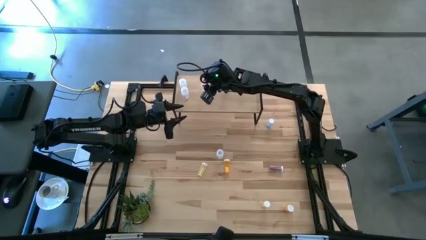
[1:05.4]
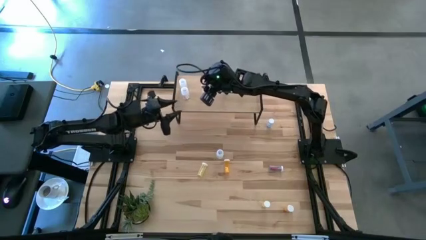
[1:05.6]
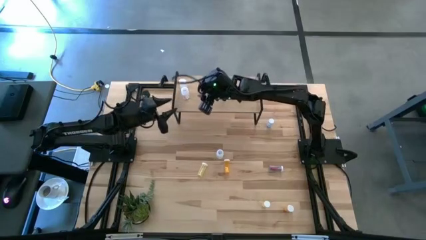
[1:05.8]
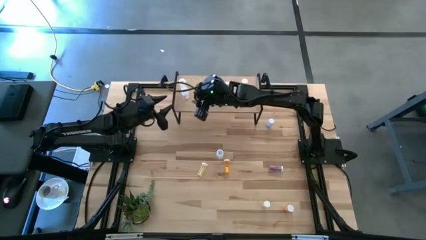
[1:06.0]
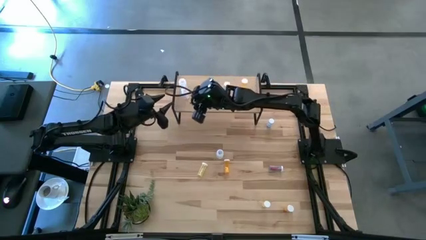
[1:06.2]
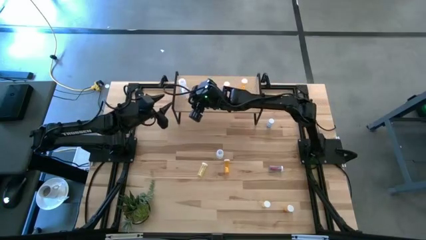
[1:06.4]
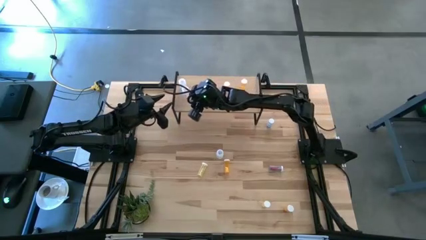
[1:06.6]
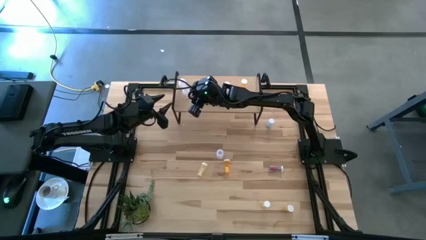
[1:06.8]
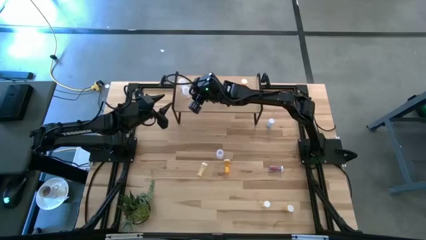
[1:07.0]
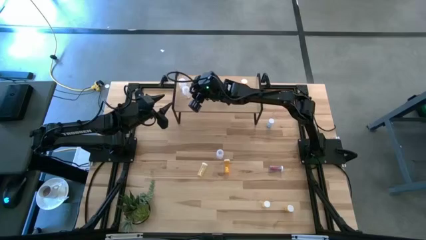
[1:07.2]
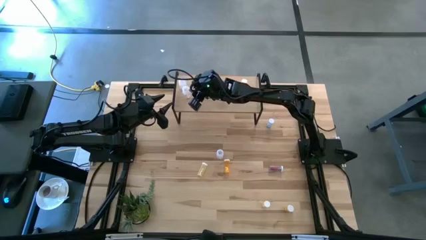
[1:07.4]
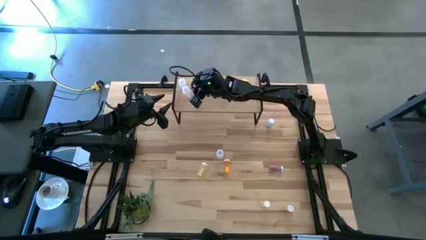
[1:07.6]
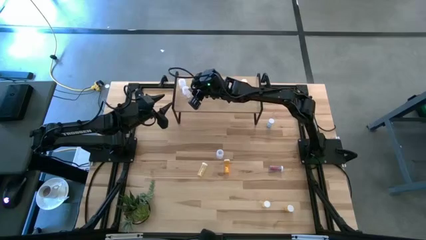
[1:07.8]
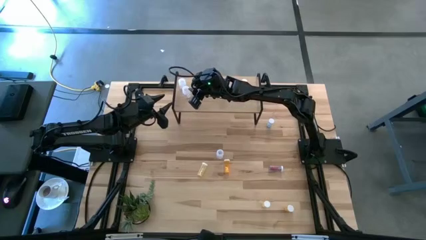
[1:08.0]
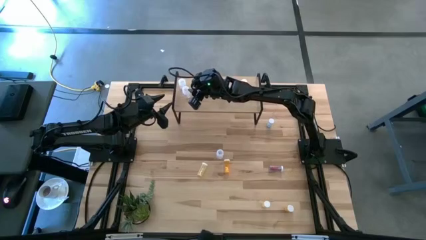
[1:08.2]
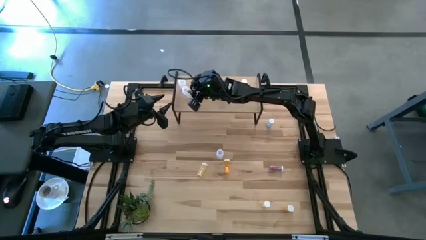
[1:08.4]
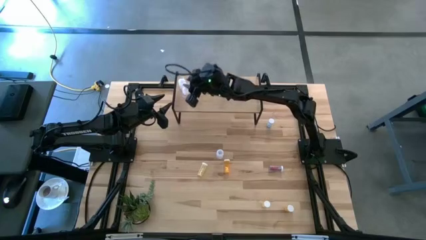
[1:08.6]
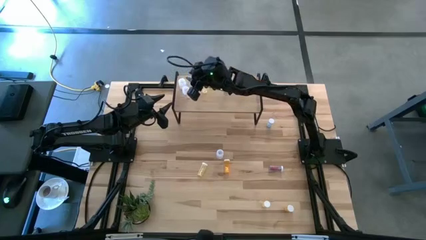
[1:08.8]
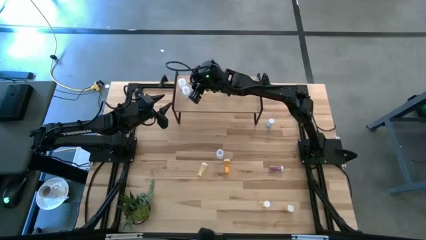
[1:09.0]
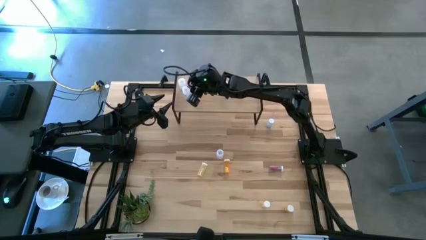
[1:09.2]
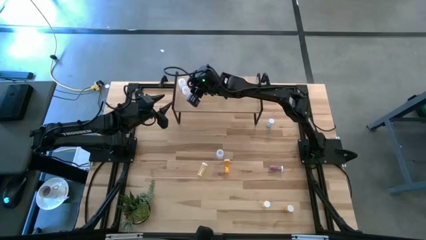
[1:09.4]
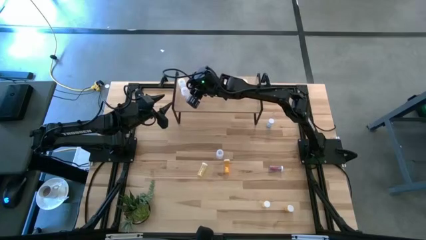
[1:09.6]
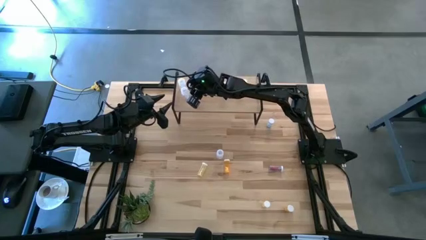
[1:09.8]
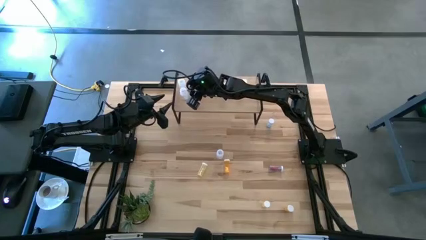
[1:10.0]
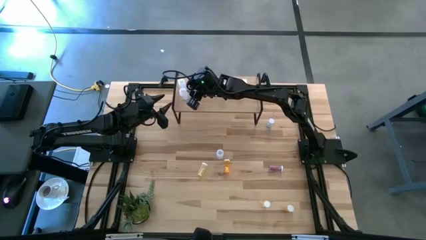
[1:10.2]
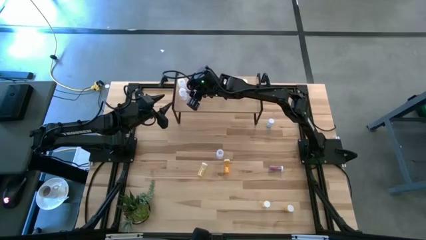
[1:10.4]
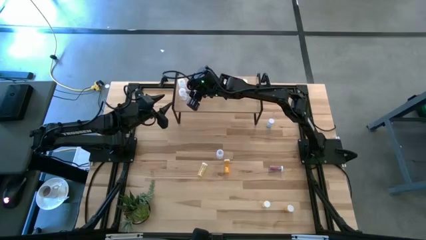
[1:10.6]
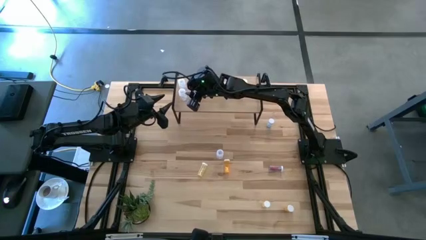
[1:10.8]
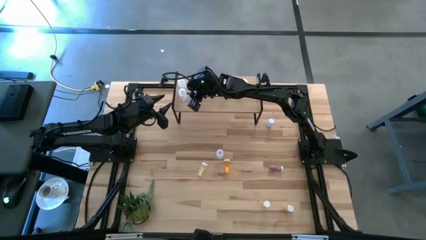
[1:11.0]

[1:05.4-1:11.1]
Task: Pick and place medicine bottles onto shelf by color
Adjust the transparent pill bottle on the shelf

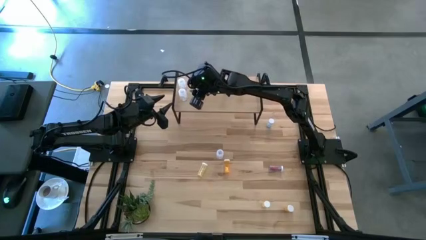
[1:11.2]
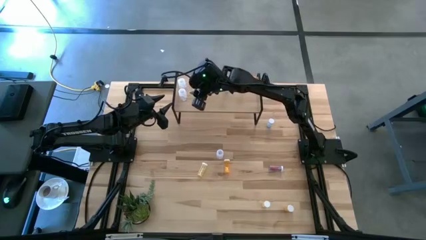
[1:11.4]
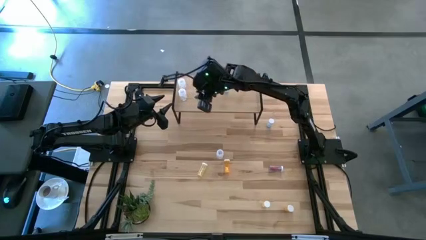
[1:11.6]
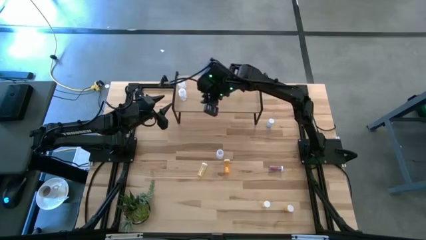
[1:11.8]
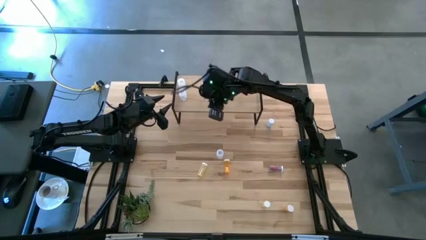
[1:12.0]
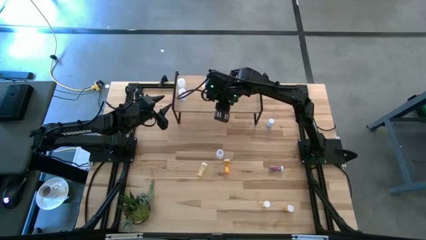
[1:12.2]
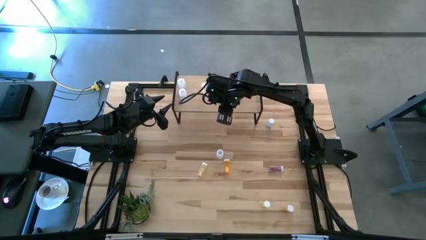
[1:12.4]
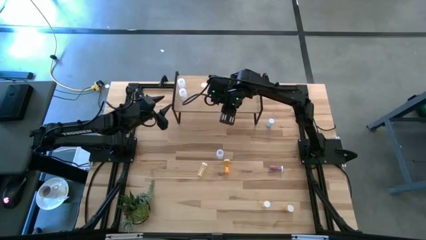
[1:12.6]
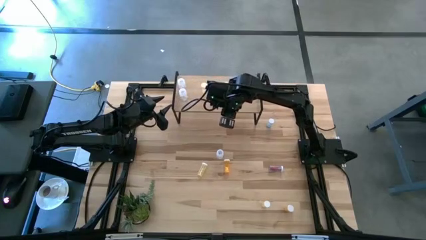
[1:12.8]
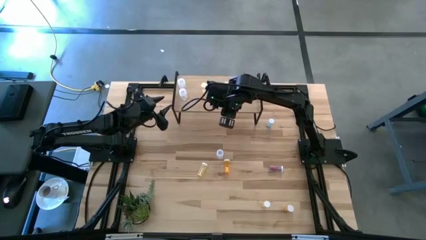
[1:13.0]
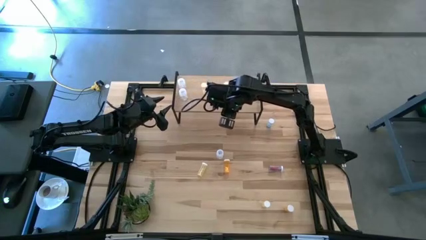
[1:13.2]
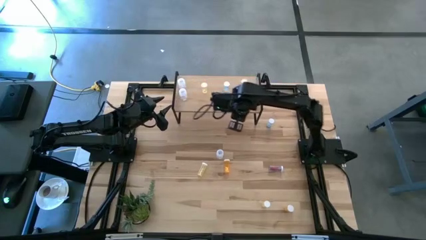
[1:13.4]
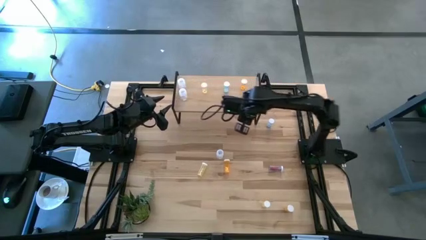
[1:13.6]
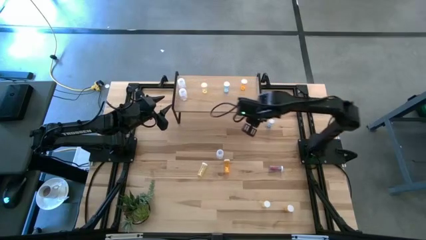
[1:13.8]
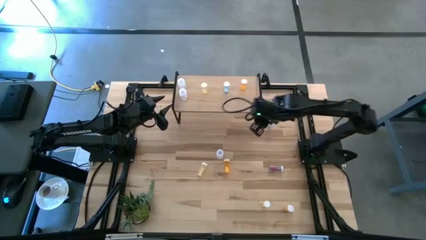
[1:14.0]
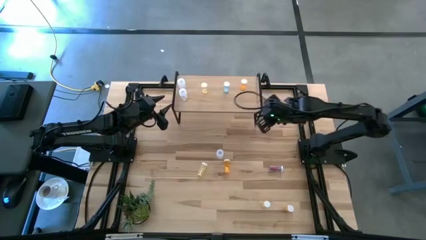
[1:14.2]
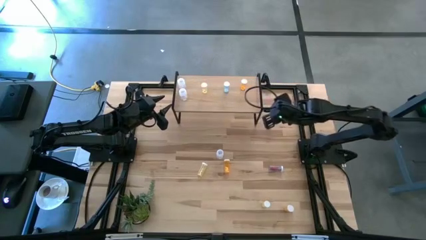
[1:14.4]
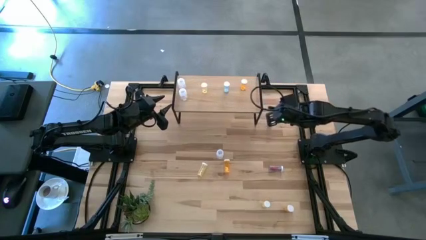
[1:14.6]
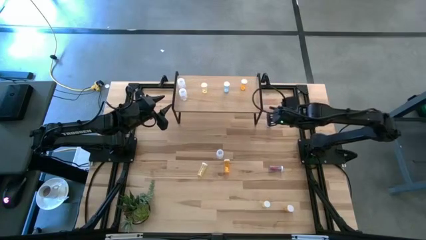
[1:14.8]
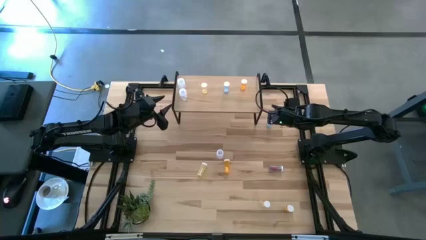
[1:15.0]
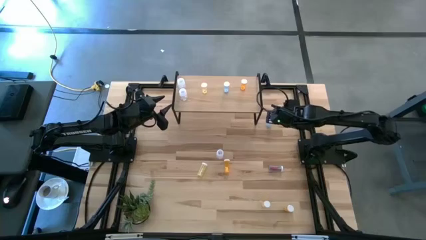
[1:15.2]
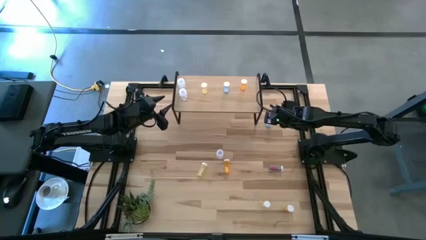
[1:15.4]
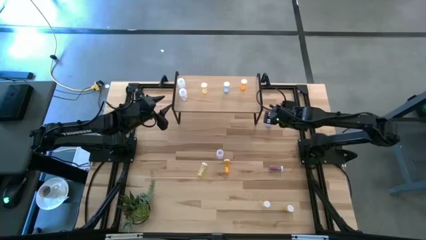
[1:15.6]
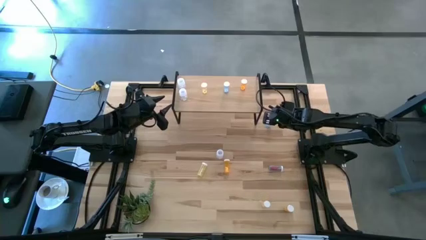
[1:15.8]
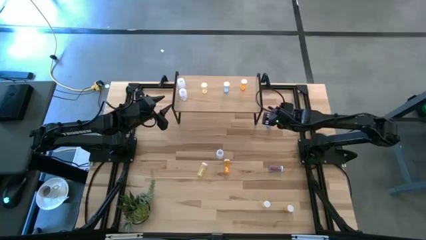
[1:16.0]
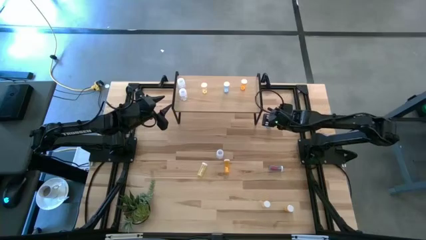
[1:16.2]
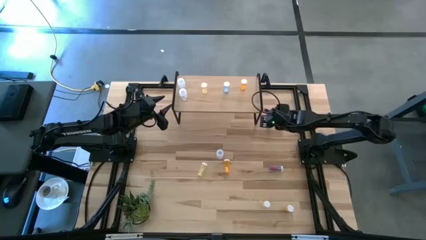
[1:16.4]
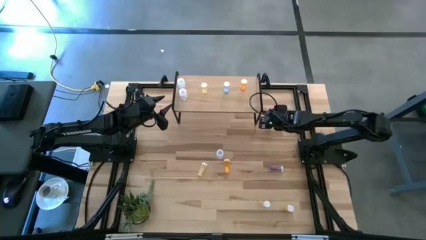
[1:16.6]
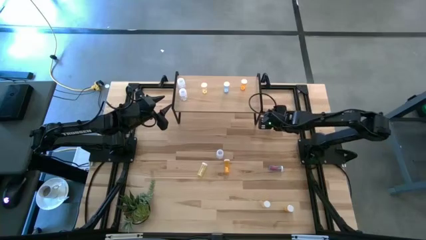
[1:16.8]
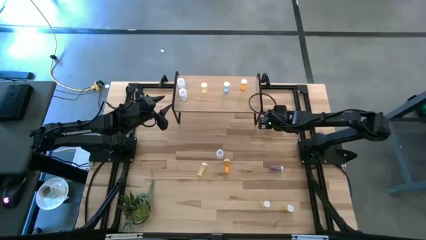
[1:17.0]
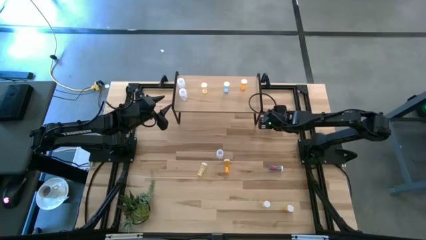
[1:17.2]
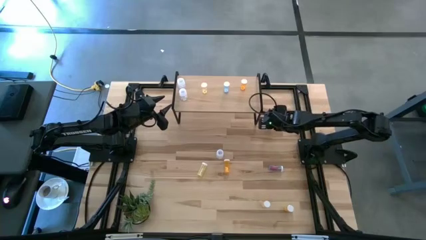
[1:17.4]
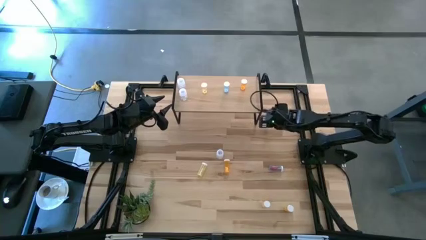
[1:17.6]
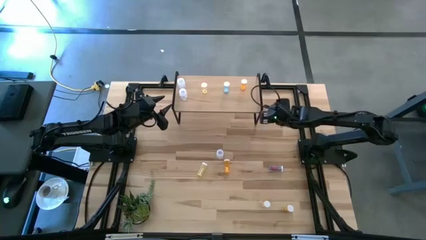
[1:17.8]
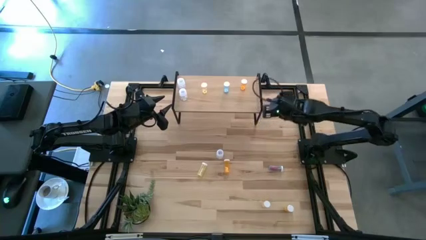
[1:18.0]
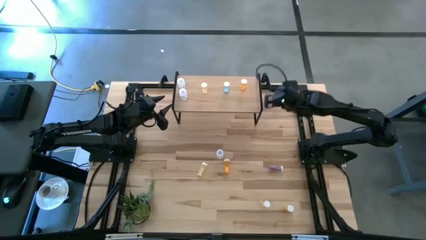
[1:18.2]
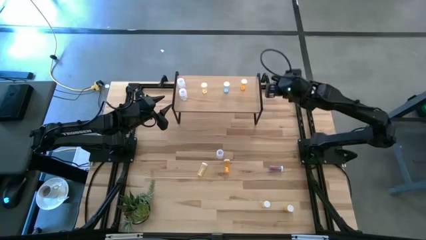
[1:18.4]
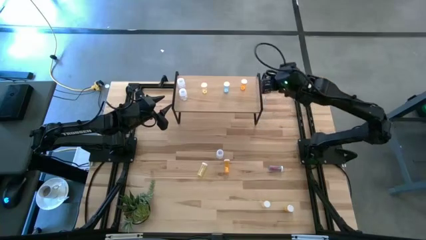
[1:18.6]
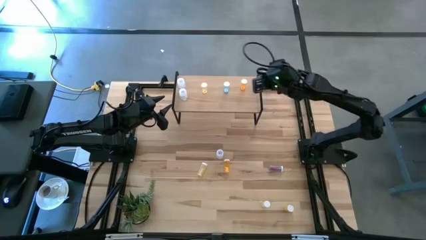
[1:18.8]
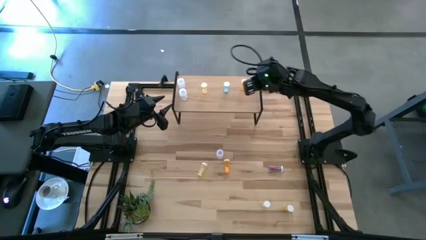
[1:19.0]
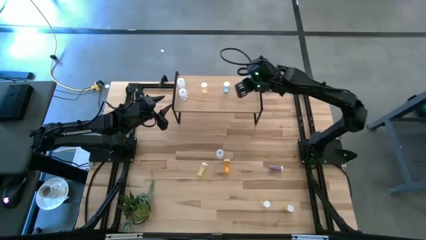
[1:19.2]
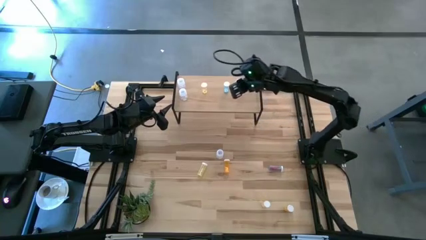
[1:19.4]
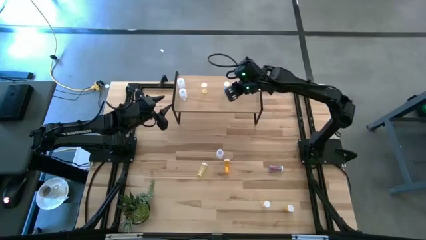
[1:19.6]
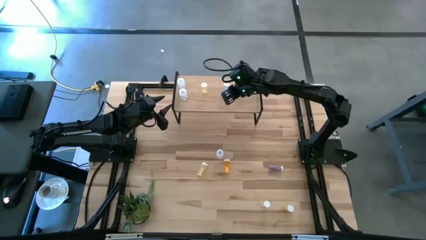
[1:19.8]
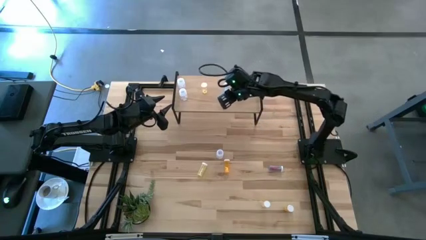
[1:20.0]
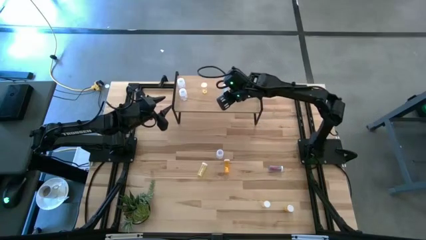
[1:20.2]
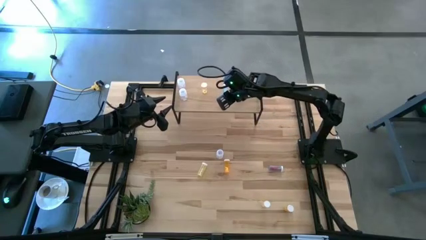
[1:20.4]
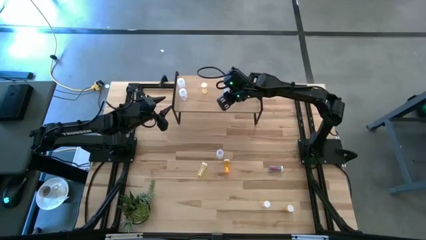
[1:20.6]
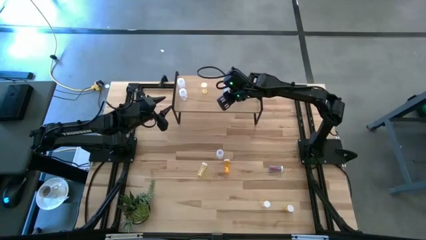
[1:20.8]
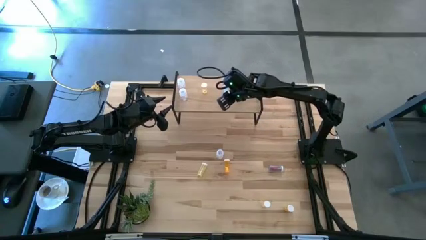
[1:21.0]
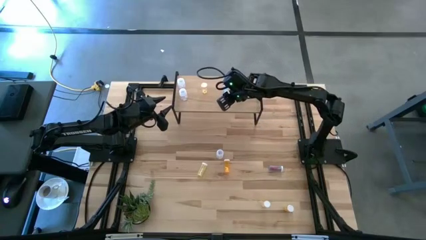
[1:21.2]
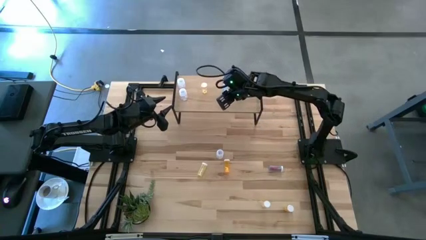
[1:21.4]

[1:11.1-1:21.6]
Put the top blue pill bottle on the shelf aligned with the other blue pill bottle

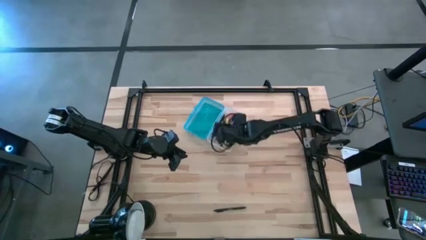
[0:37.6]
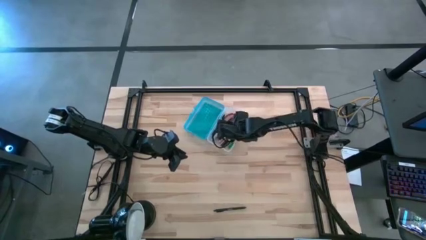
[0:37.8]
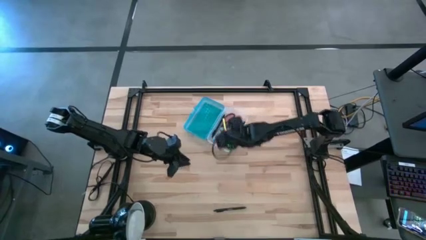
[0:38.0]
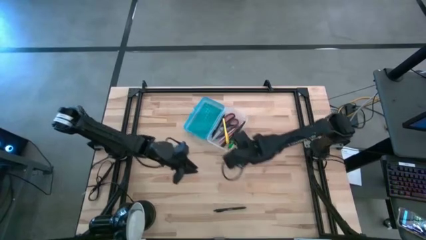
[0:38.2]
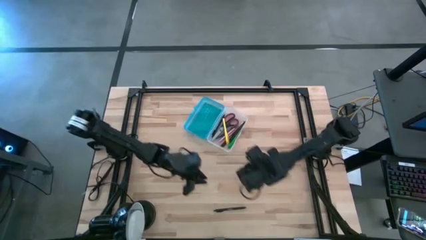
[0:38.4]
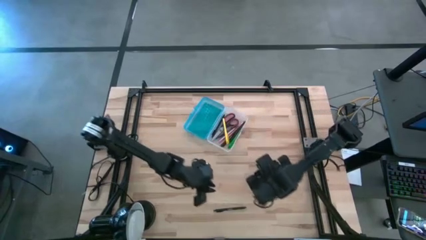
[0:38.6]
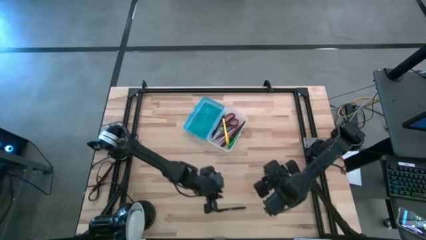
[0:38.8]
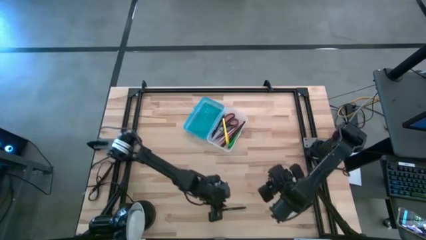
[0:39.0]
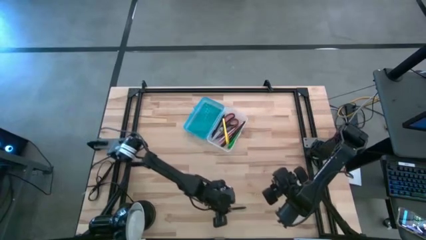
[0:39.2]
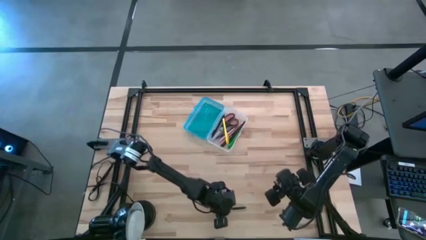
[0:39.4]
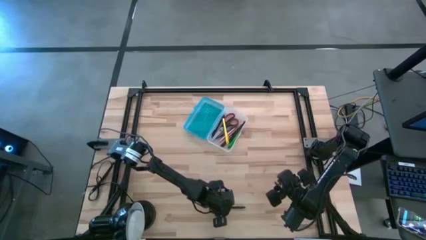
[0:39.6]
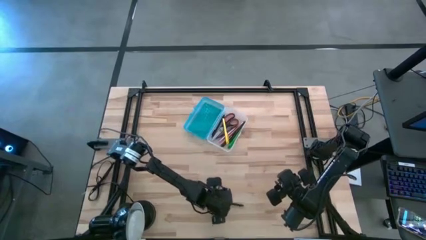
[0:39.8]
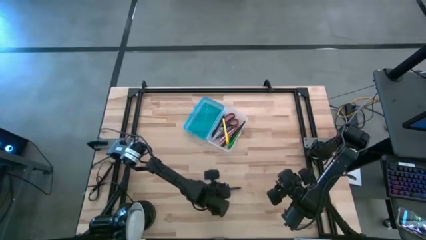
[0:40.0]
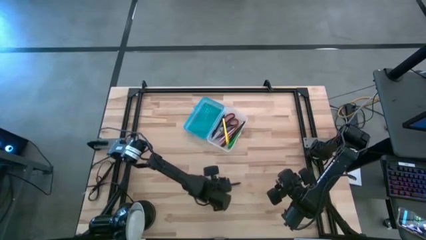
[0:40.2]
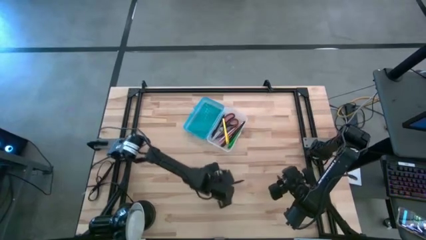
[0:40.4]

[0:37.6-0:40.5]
Task: Pick & place school supplies into a supply box
Put the black pen into the blue supply box
